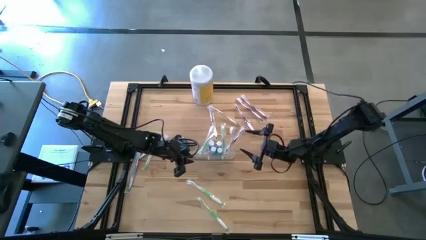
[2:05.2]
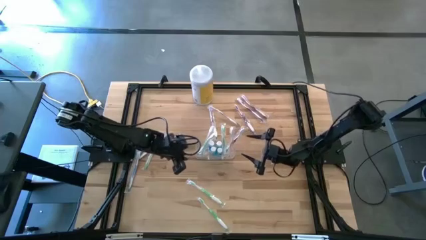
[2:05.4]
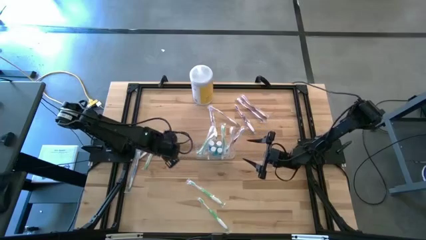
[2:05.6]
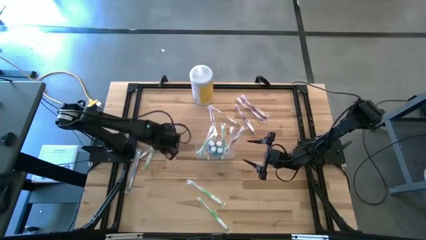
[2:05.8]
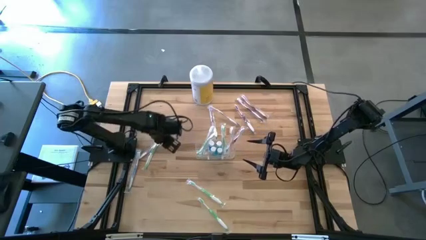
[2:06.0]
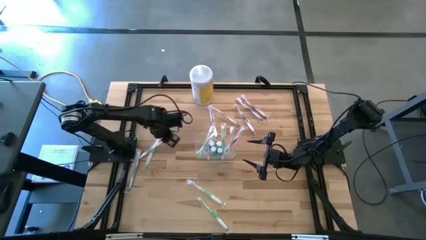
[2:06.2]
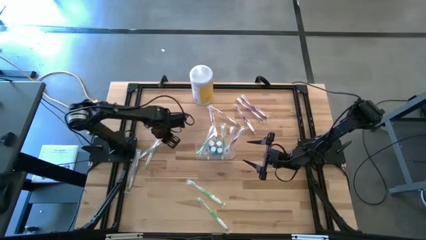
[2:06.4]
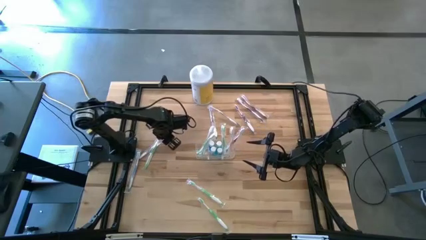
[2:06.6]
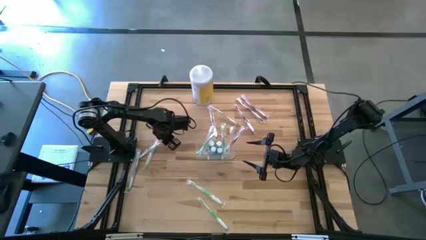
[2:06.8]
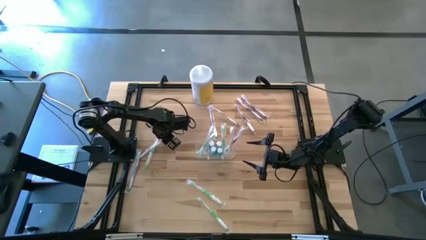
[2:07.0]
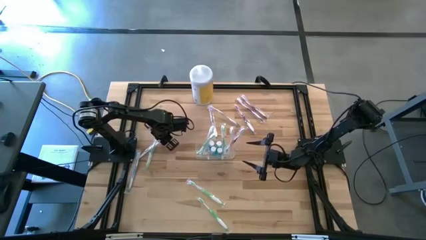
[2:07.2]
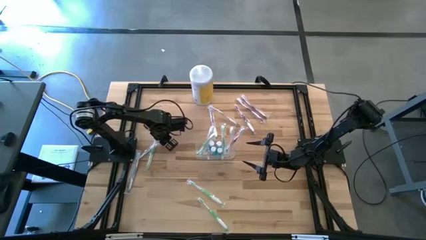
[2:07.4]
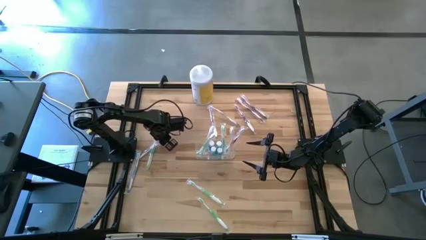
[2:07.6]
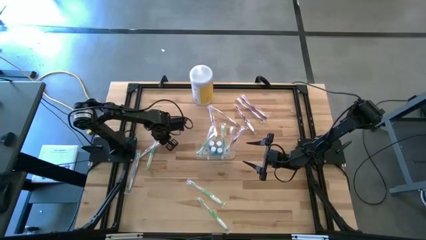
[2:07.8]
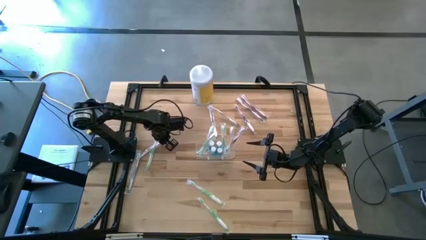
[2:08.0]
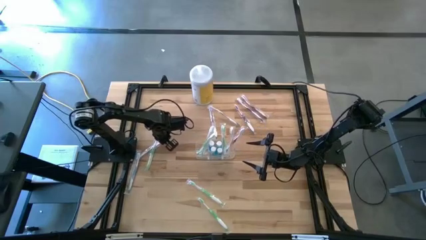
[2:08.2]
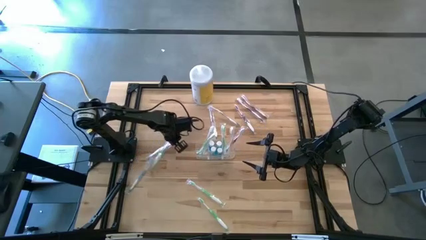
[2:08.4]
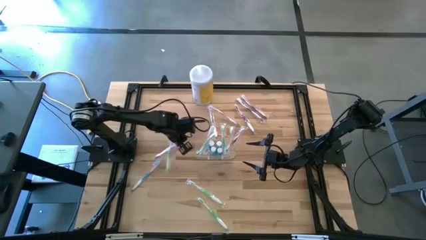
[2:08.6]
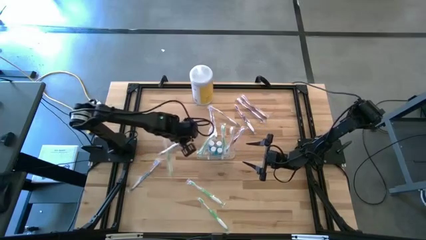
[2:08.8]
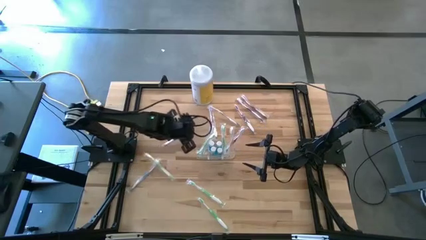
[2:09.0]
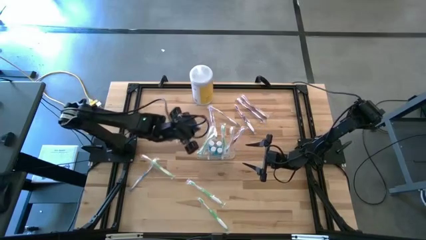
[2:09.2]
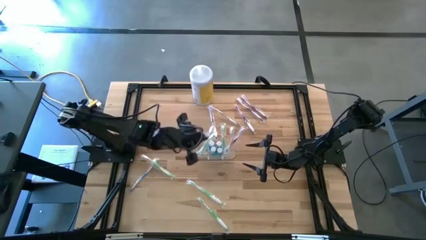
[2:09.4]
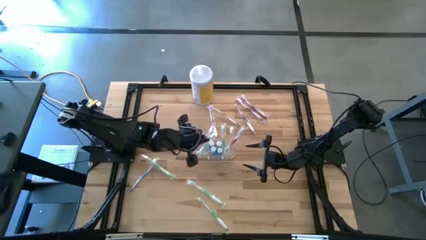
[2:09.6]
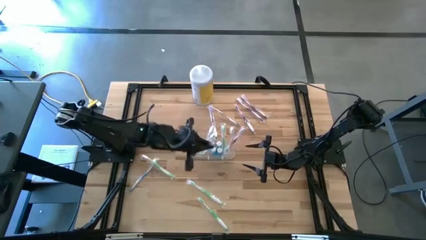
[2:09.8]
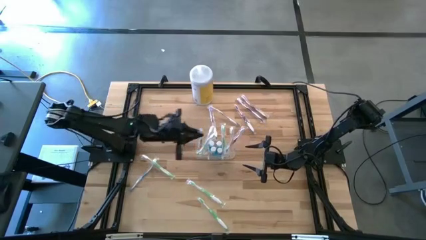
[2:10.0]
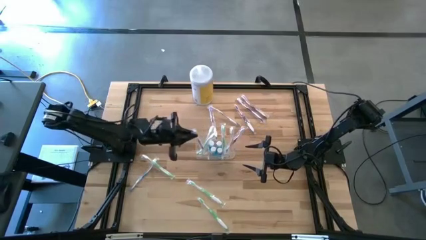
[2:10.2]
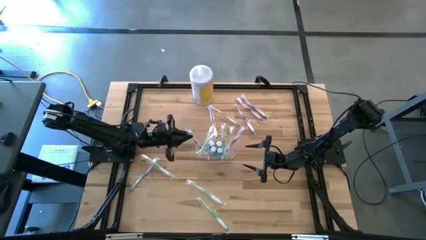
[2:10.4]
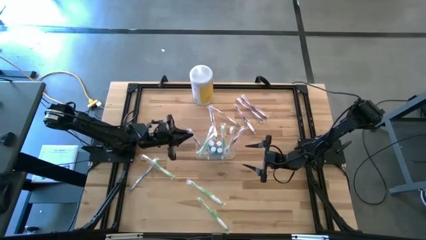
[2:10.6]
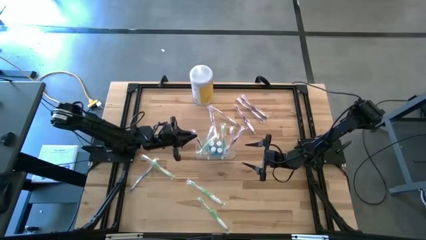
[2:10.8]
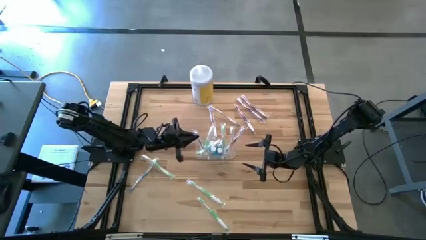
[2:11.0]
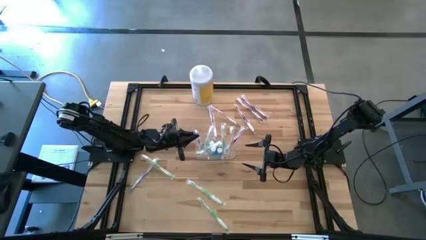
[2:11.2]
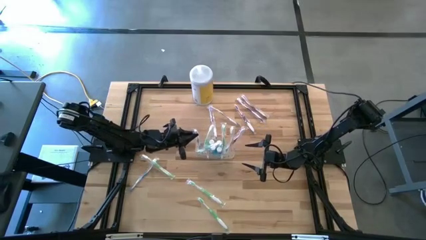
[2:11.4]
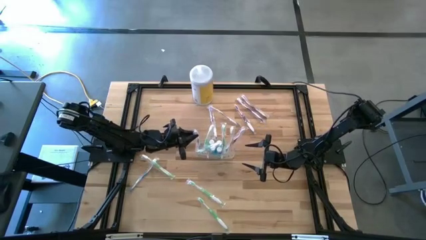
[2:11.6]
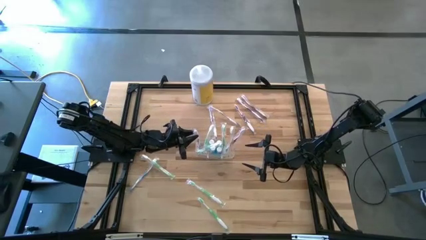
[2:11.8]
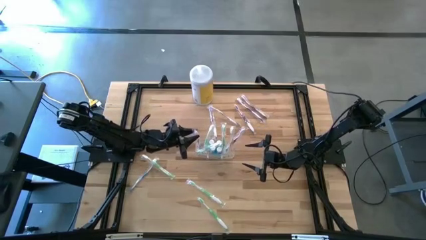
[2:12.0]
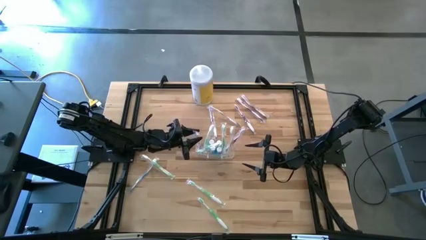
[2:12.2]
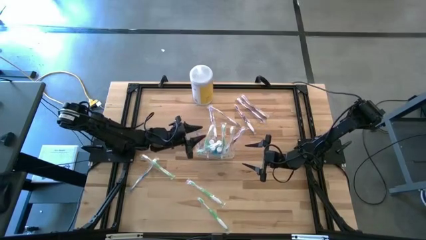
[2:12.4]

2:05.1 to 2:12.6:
Task: Pick & Place toothbrushing station
Put the purple toothbrush into the transparent organizer

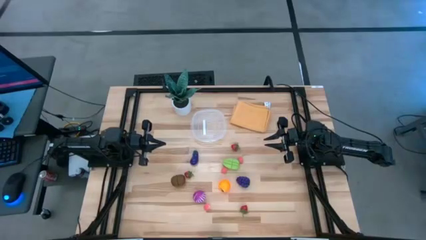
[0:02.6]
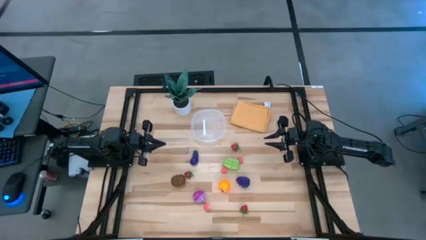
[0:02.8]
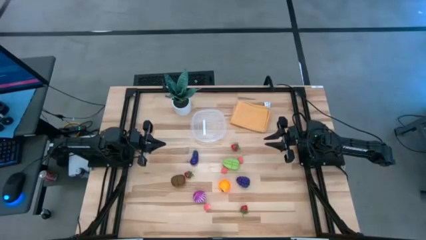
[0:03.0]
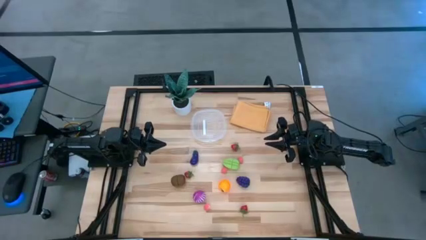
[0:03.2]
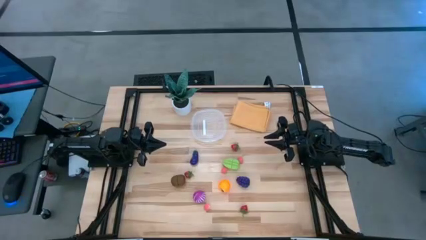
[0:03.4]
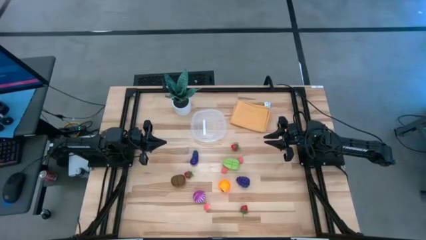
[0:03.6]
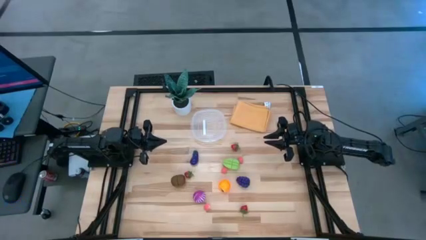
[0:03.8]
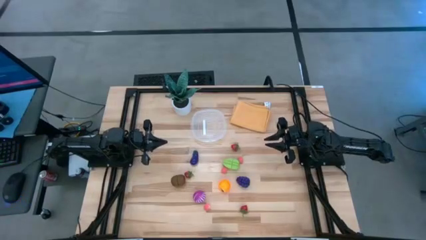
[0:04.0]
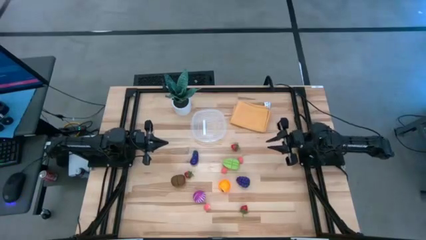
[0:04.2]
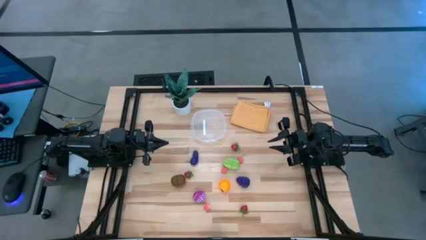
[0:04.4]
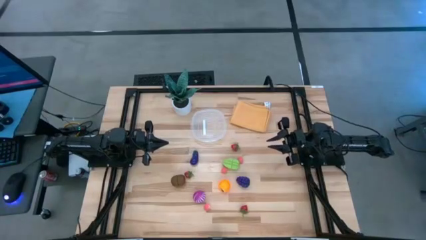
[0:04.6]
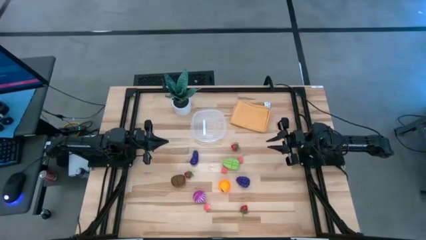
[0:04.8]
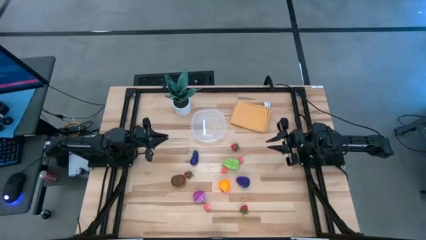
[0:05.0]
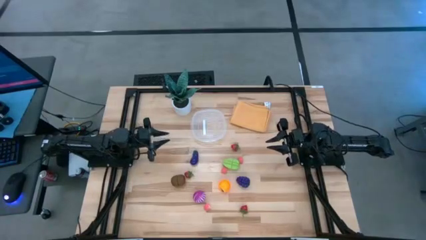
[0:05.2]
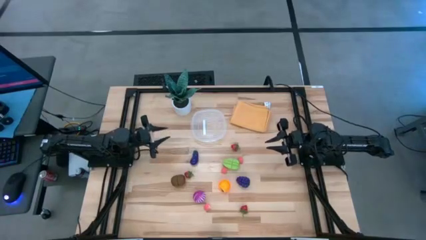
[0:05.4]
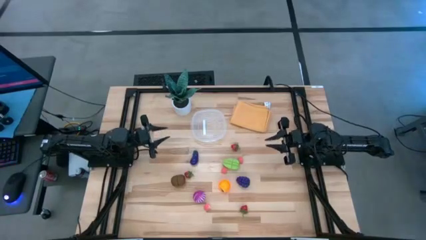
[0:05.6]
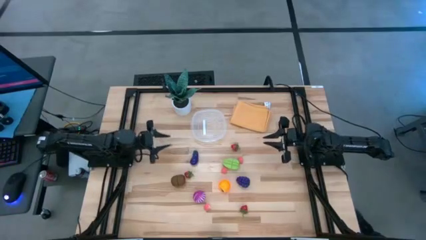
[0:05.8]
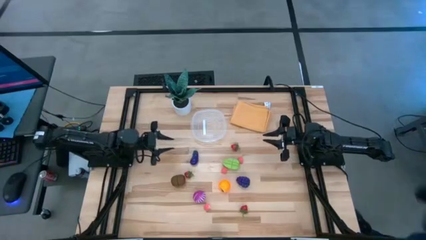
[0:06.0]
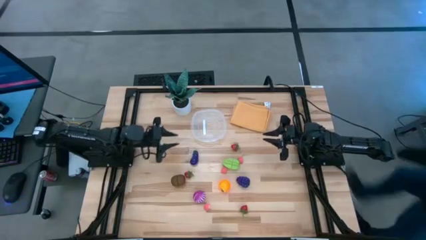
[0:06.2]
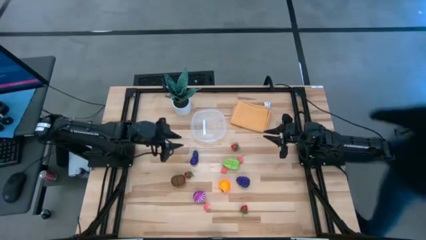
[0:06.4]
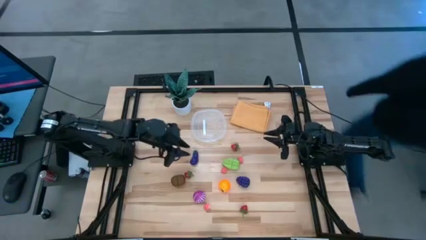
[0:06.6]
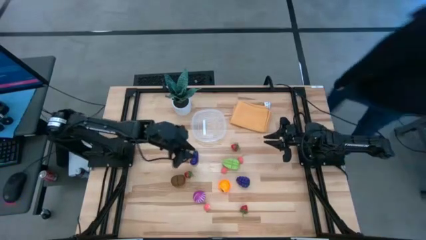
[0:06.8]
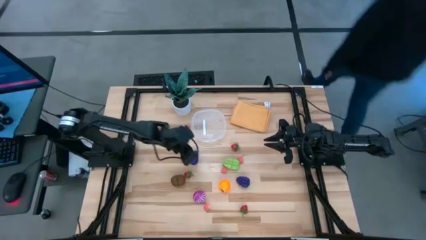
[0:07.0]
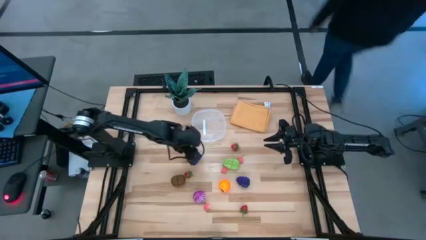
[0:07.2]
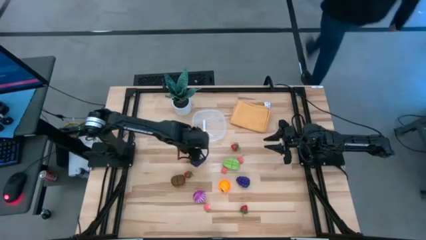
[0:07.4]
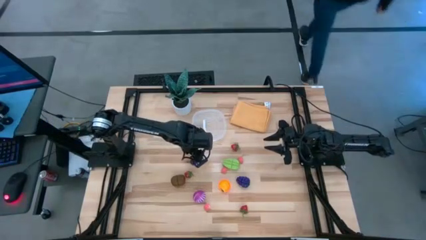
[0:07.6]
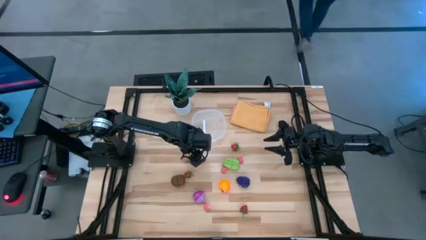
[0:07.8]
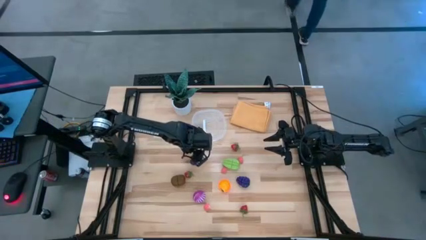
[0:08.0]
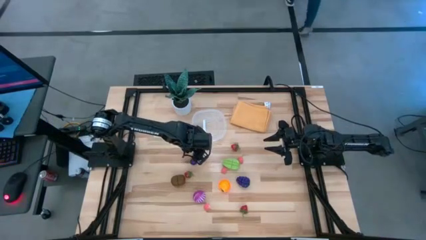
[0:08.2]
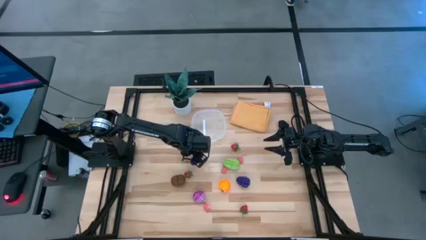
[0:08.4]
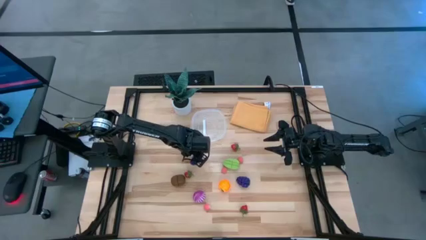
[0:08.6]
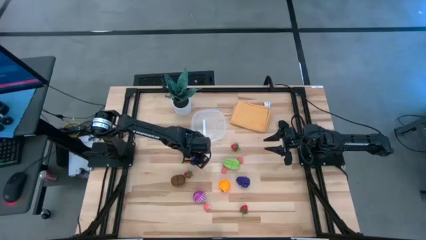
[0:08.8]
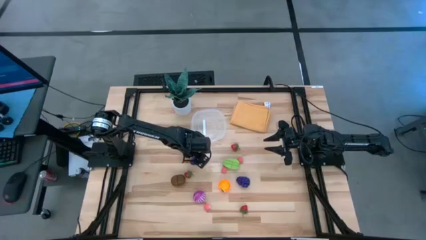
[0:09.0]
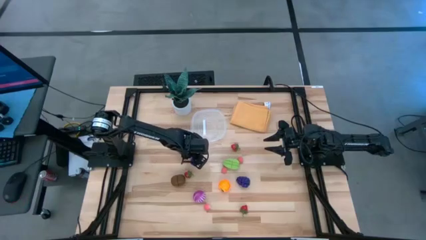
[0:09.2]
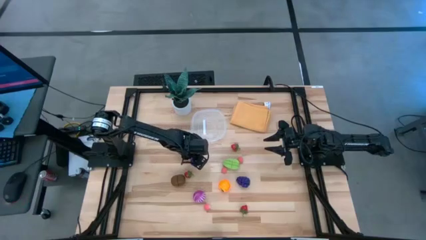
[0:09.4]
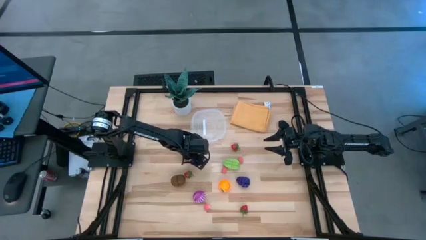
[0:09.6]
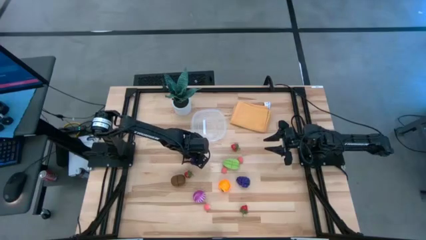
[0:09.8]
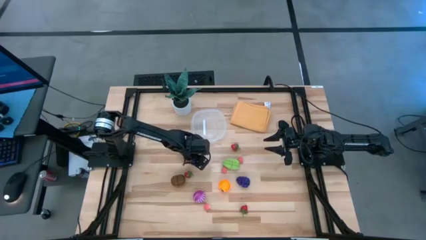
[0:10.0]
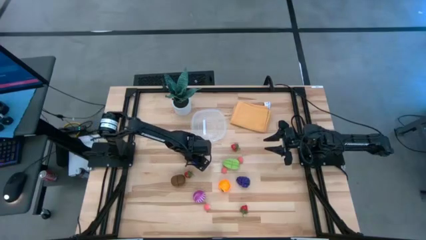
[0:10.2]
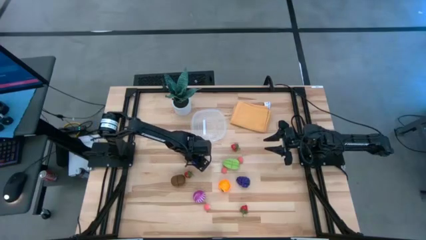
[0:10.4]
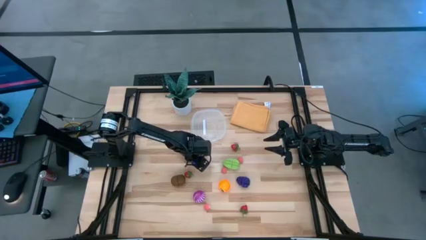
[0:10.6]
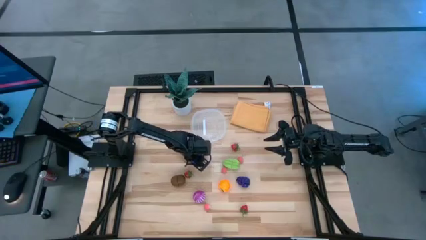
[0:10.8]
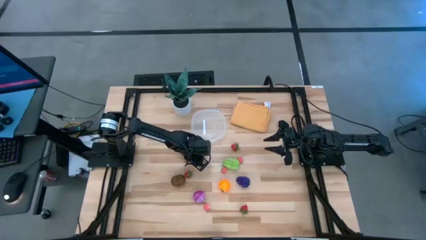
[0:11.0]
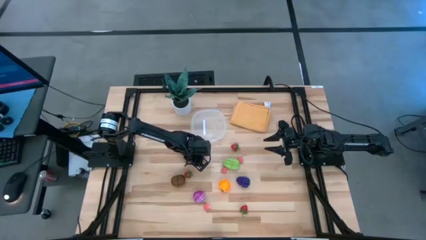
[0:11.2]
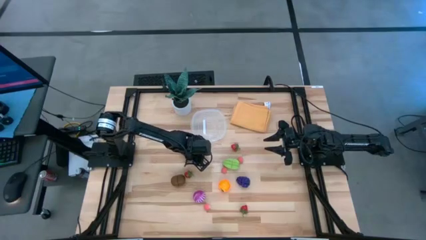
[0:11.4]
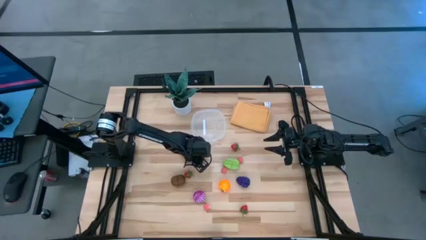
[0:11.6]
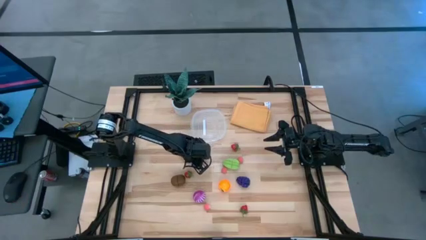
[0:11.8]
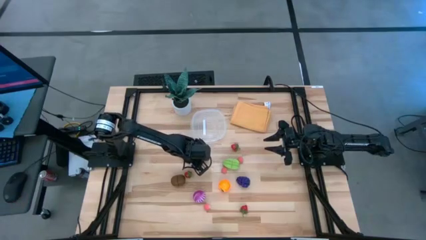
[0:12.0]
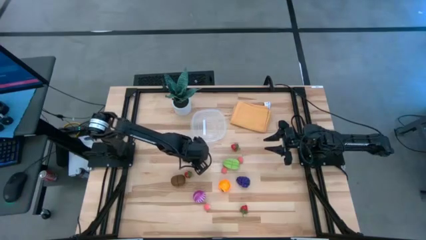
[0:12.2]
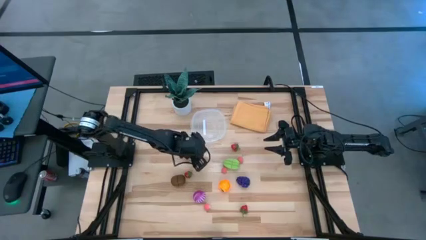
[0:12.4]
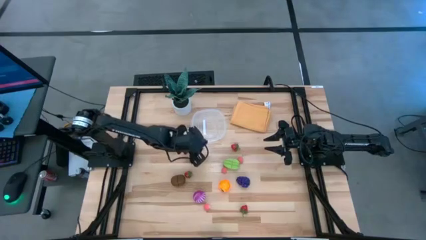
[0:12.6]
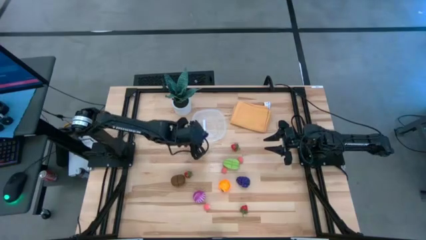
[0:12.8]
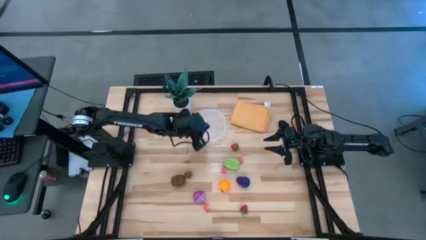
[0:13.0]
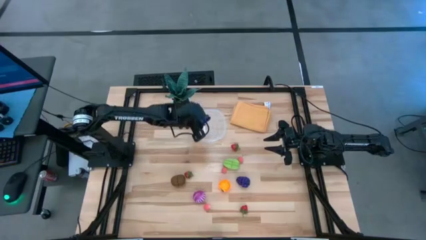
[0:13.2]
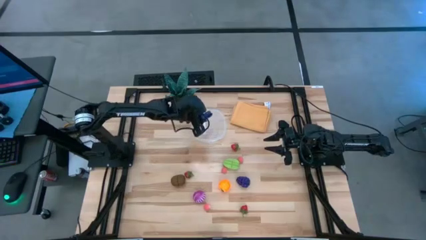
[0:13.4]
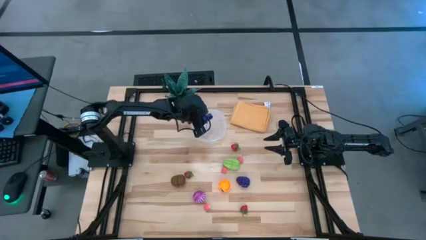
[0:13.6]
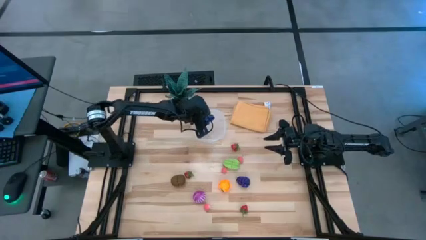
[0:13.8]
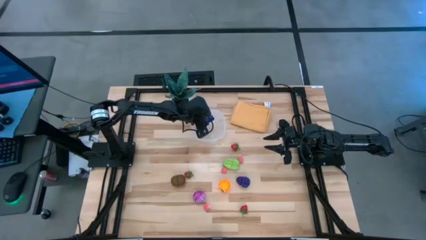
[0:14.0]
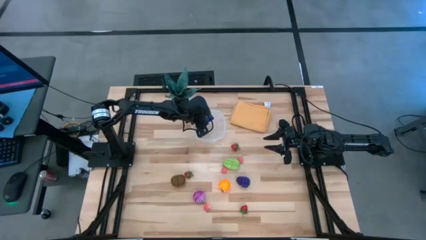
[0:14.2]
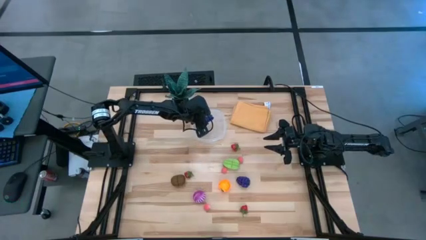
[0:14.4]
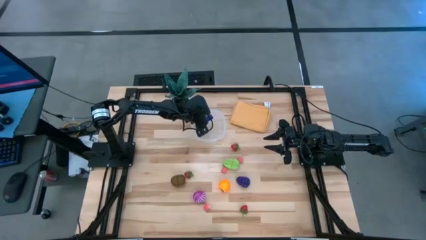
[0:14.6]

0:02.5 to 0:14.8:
Task: Pick and placing Produce into tupperware
Put the purple eggplant into the transparent bin
